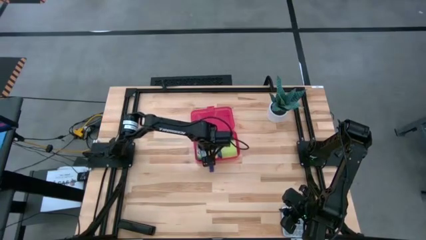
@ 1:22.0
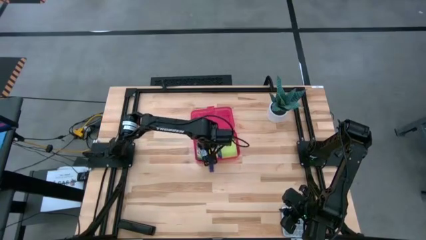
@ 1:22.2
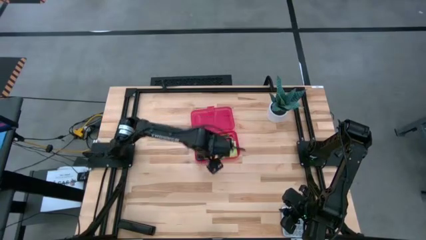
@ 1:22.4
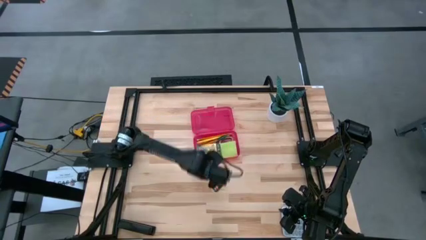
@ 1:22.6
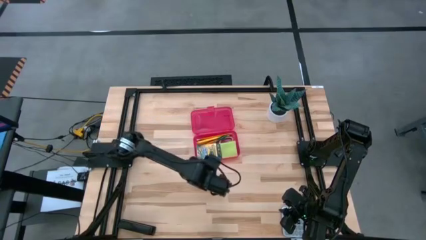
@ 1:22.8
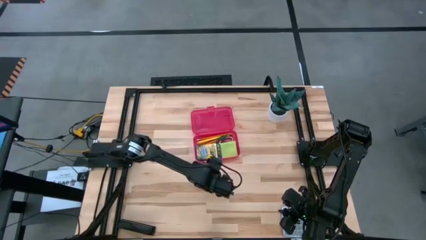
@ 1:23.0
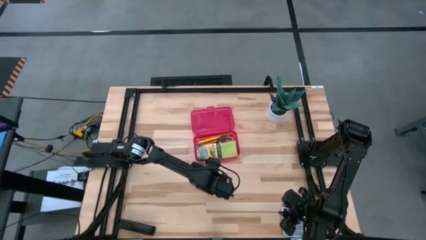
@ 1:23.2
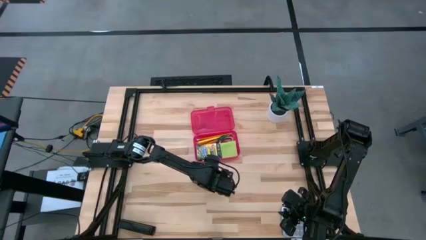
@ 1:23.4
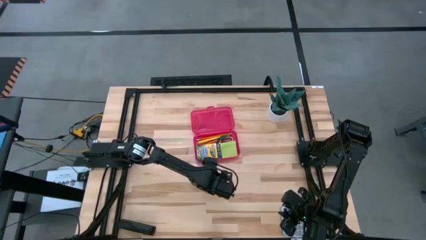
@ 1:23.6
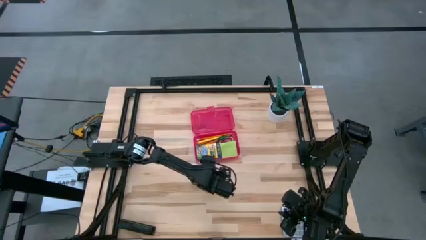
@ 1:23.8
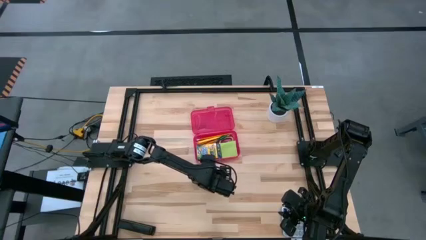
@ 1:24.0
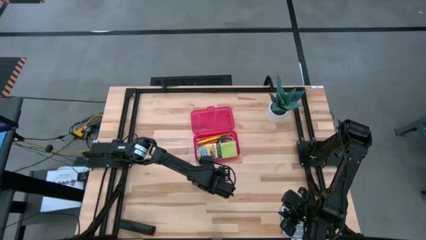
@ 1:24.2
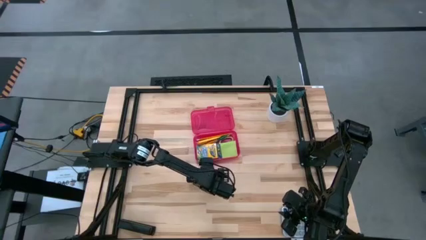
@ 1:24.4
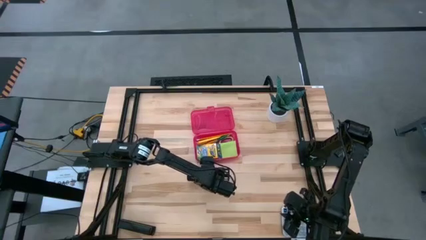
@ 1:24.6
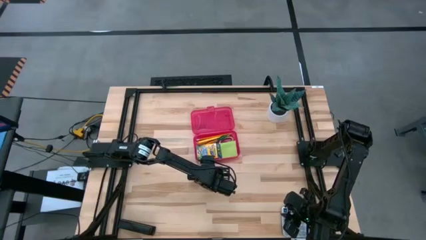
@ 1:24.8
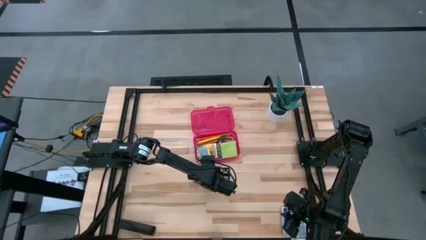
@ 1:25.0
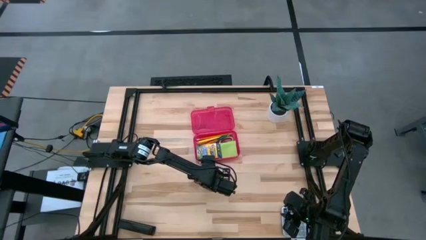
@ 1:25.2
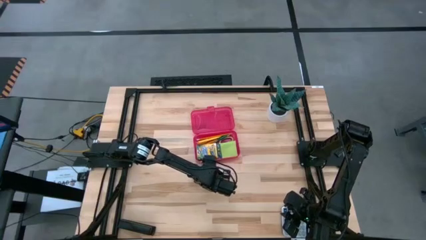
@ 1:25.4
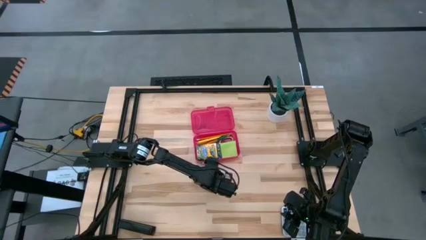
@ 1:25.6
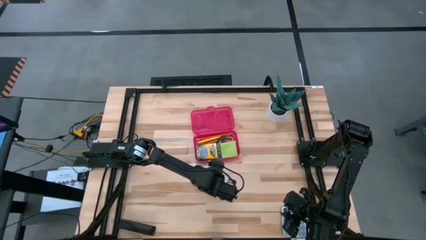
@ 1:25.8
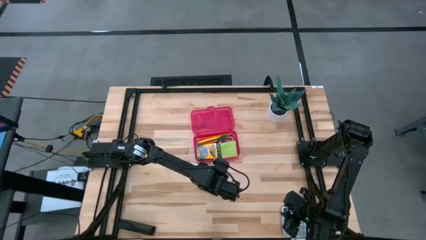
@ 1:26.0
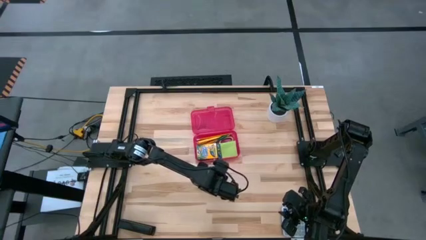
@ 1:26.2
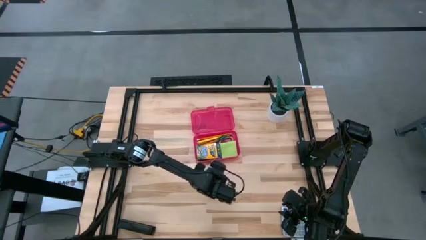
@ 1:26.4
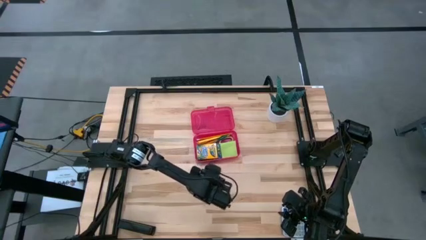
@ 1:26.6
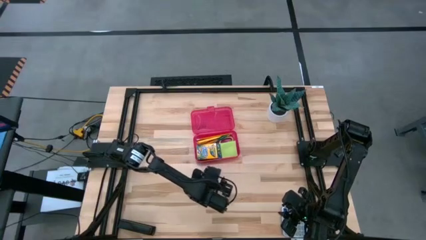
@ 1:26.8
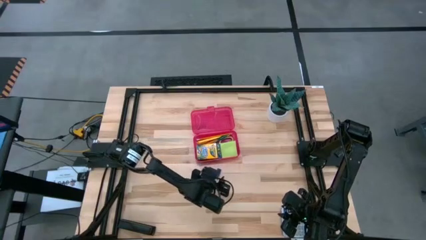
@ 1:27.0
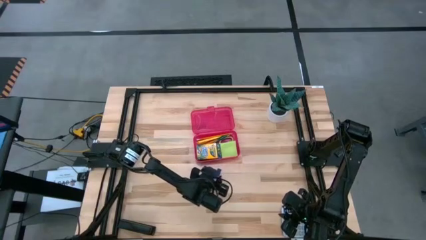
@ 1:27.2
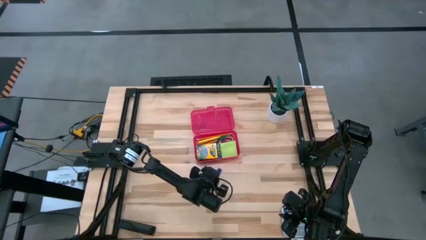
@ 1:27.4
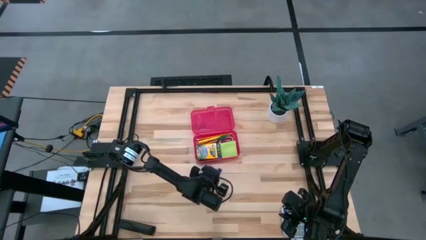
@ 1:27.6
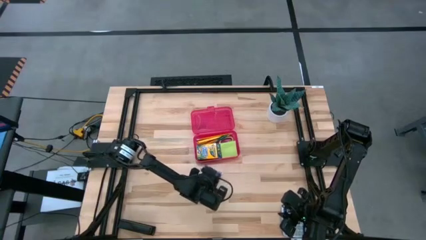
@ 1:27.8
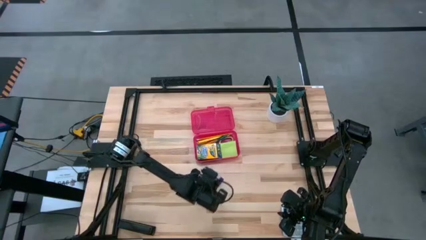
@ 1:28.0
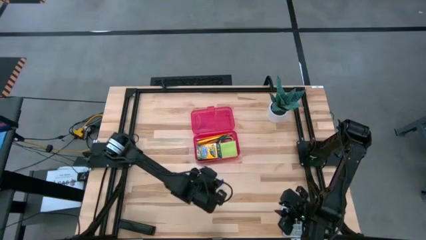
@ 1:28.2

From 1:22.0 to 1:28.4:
Task: Pack school essentials
Put the blue eraser into the supply box

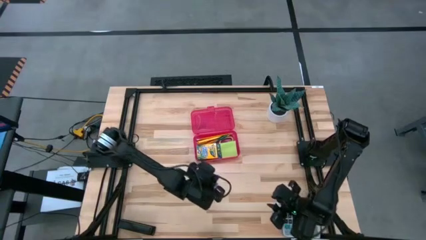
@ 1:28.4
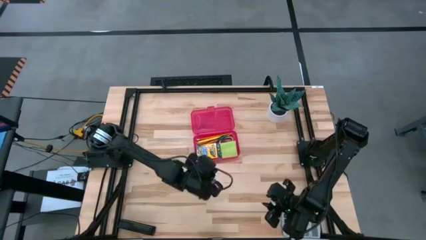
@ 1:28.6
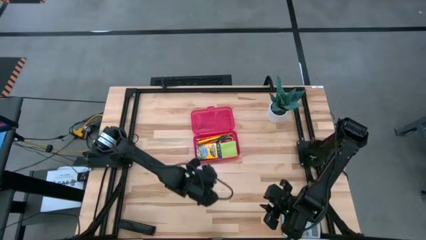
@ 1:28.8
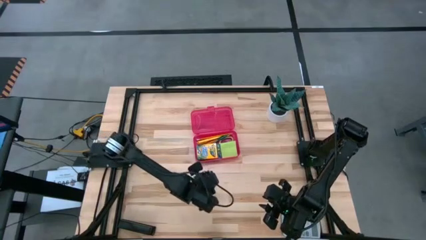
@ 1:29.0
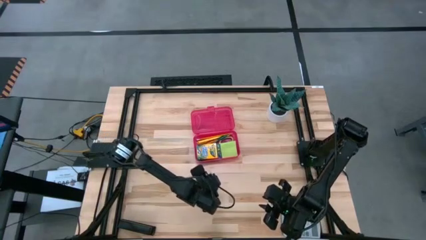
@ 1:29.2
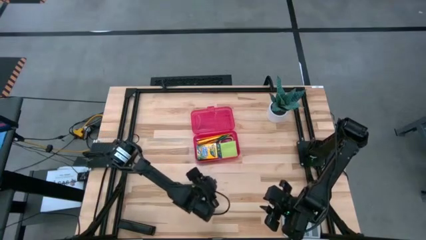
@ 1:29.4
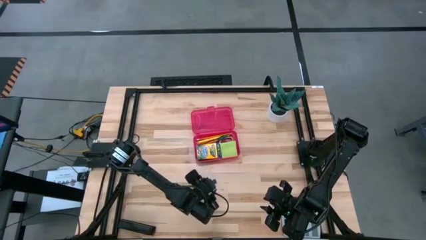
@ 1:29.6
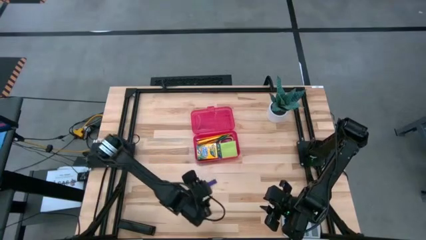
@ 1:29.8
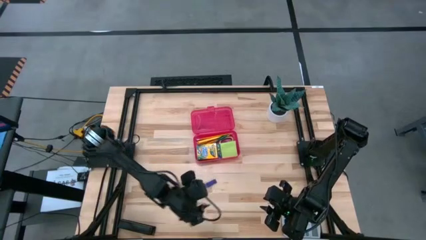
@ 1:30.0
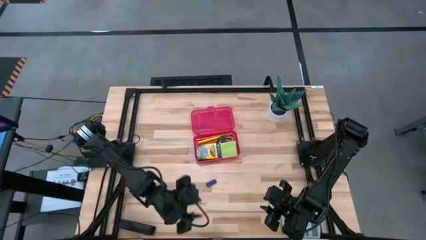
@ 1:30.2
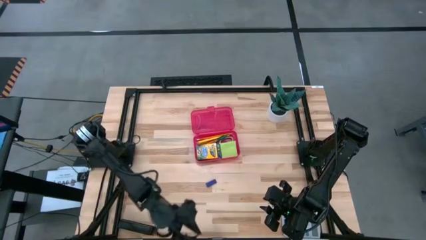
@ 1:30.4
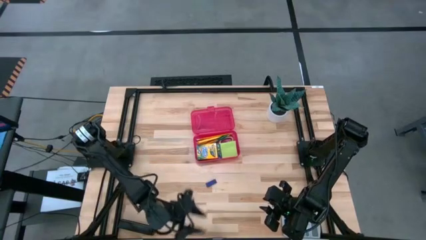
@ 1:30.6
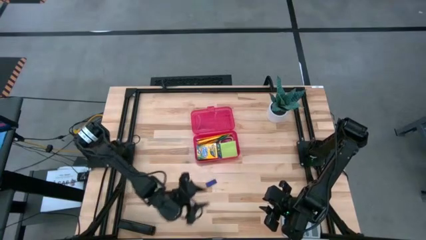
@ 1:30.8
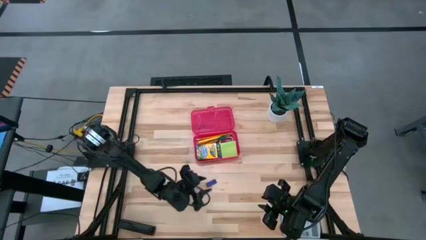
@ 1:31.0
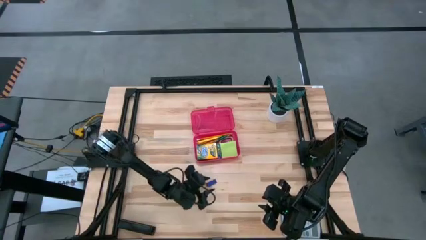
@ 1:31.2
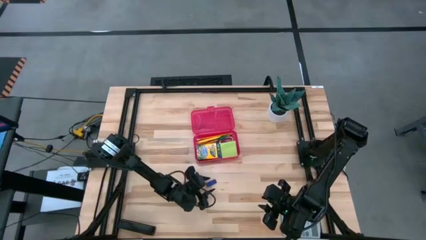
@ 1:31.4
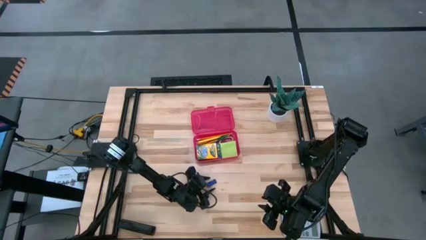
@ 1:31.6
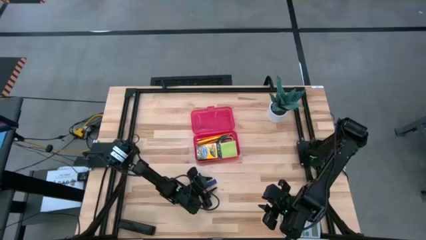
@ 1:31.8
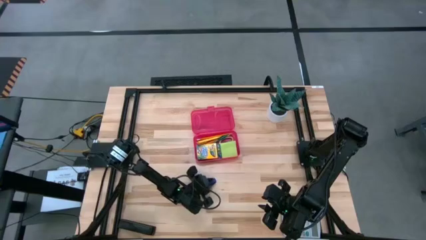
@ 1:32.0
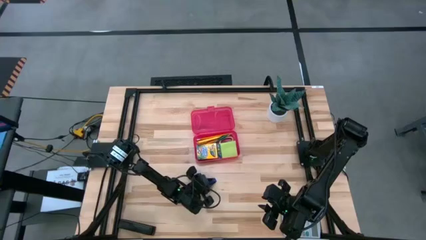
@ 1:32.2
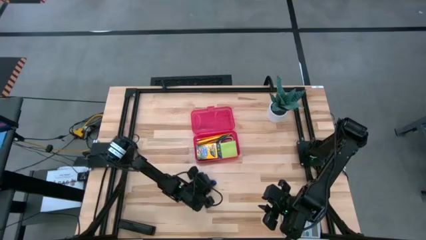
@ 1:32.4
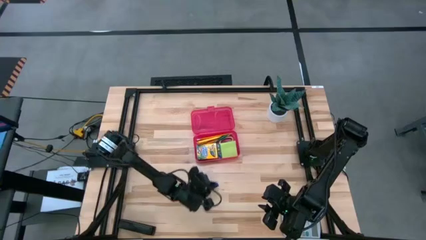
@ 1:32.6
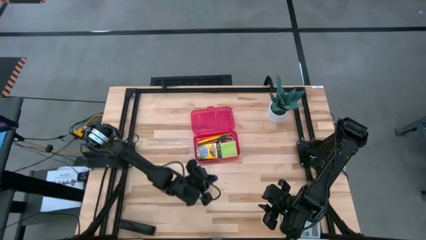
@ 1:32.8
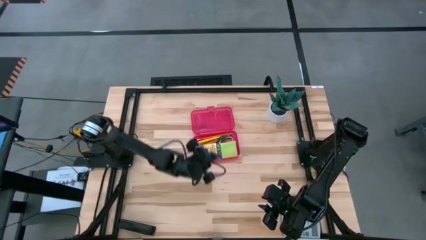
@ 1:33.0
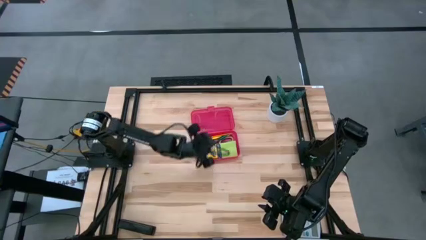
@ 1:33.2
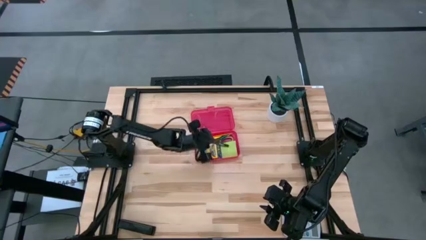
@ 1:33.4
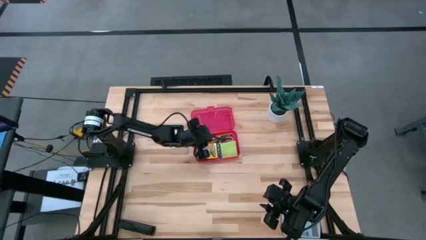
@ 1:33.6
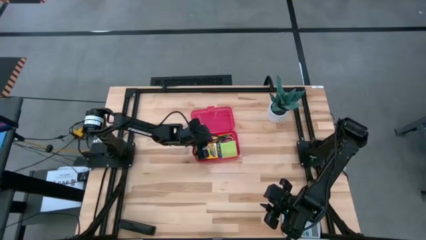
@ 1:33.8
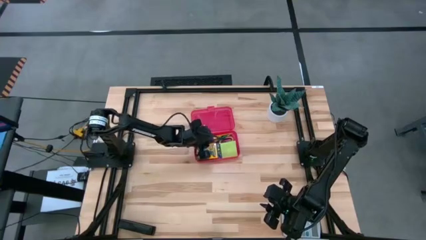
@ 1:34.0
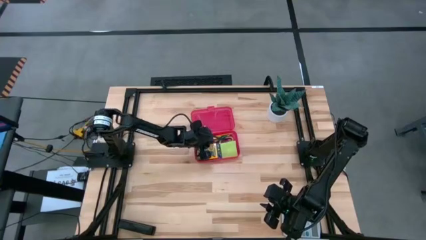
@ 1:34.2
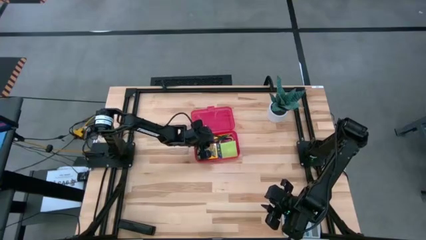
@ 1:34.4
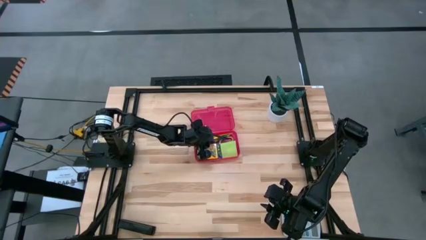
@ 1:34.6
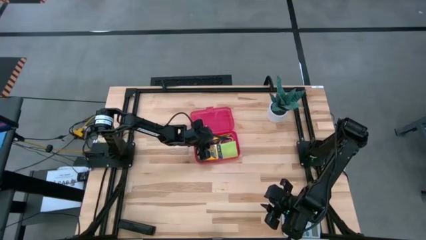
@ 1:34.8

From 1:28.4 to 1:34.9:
Put the blue eraser into the supply box
